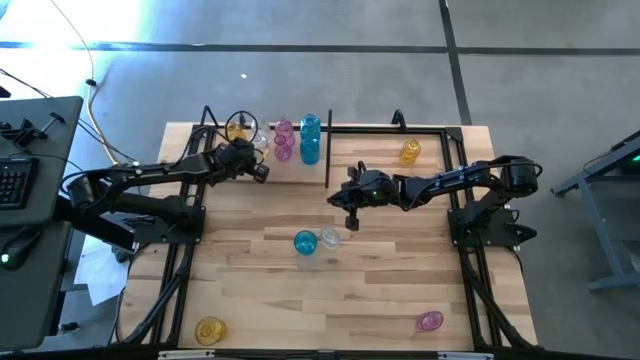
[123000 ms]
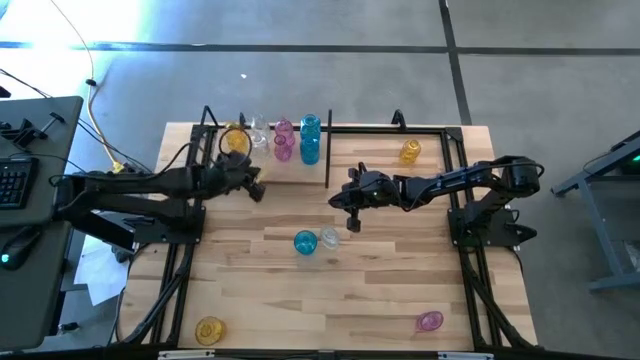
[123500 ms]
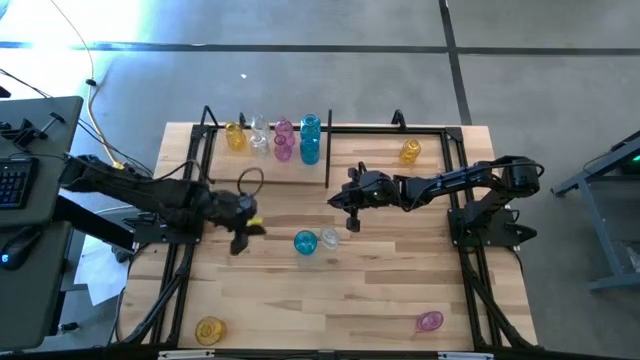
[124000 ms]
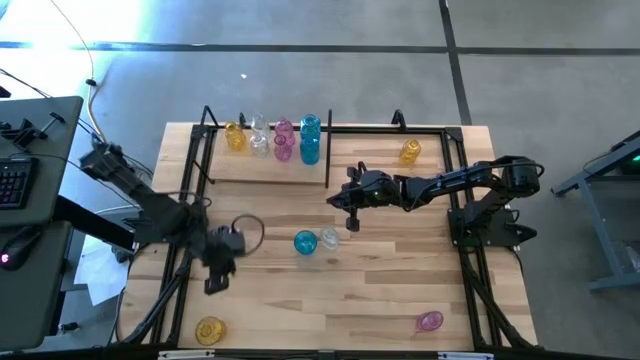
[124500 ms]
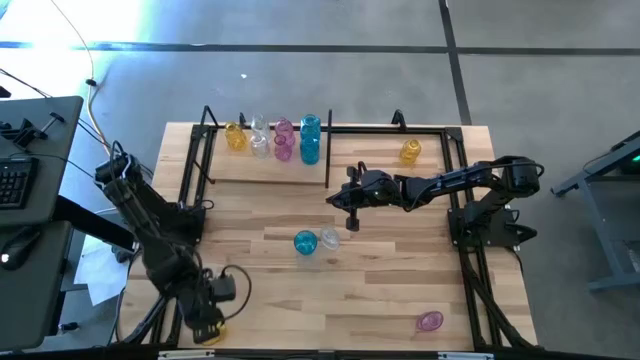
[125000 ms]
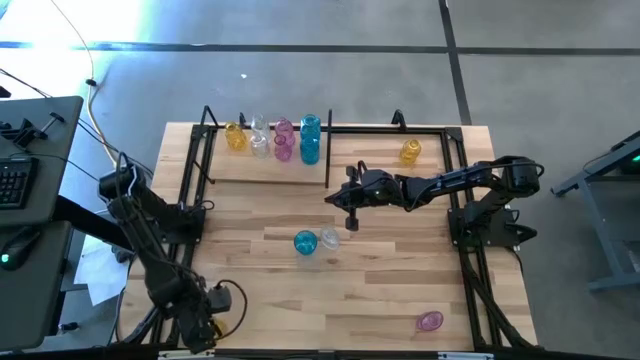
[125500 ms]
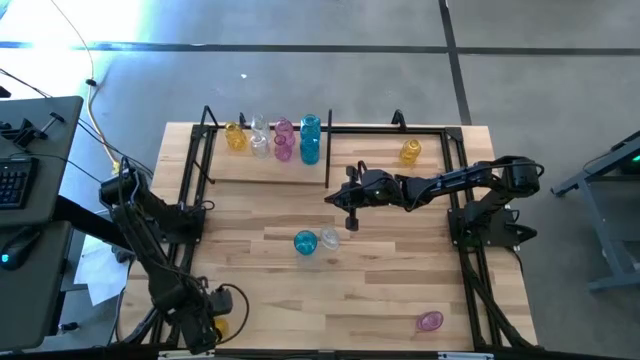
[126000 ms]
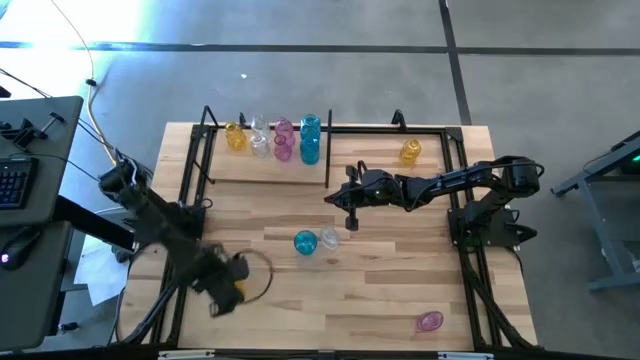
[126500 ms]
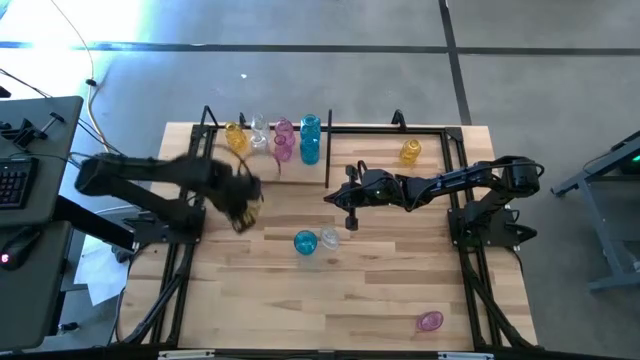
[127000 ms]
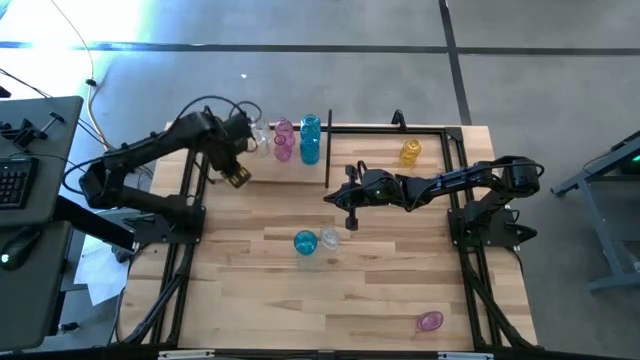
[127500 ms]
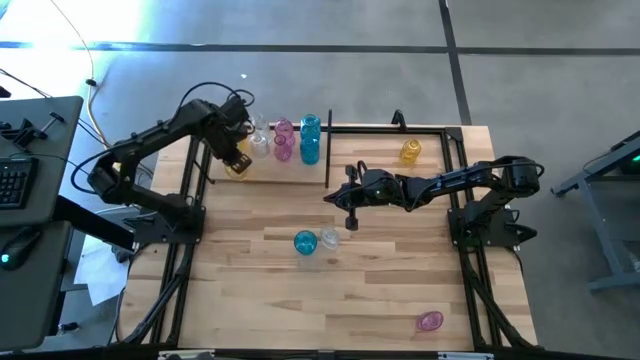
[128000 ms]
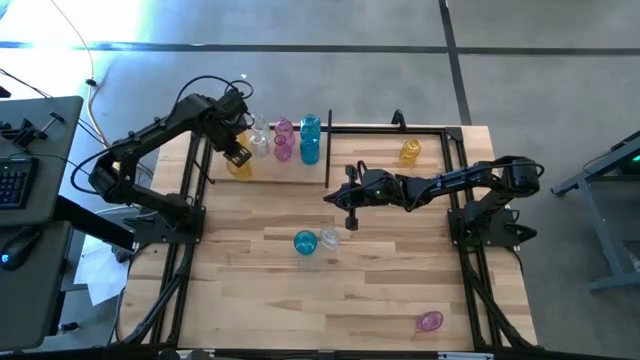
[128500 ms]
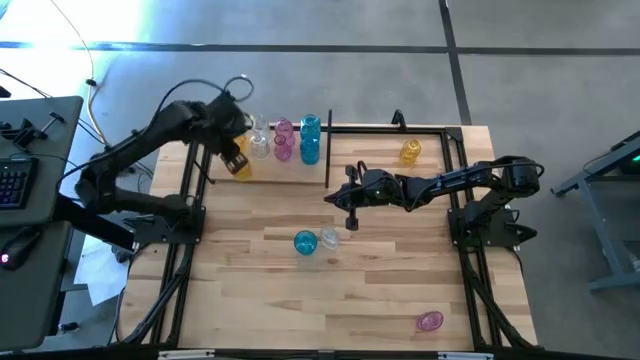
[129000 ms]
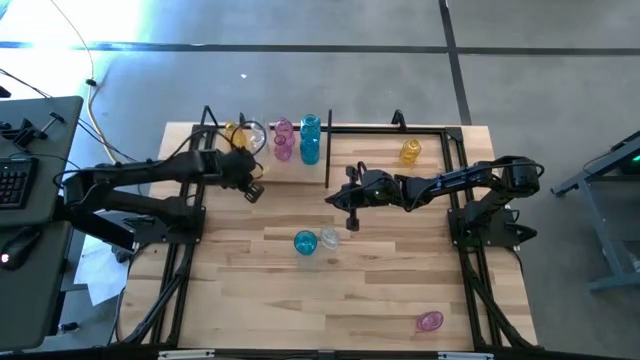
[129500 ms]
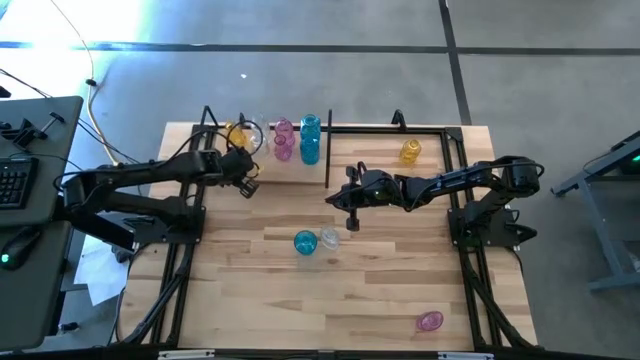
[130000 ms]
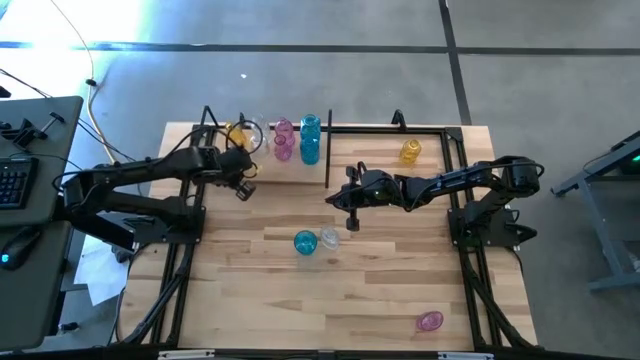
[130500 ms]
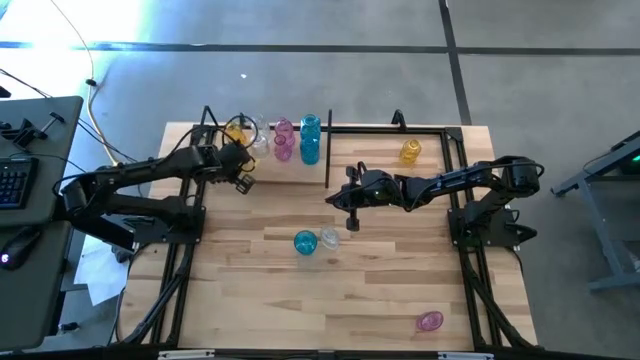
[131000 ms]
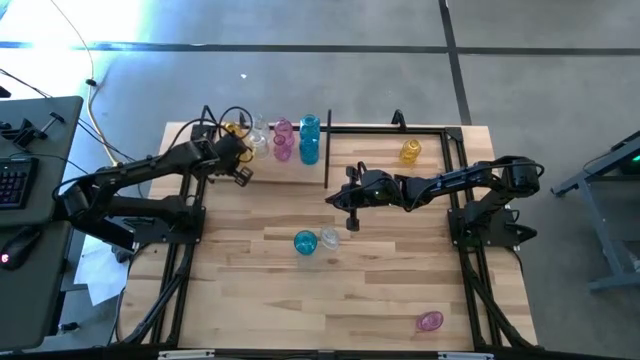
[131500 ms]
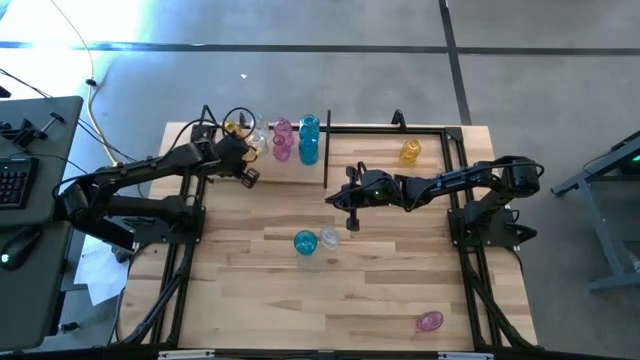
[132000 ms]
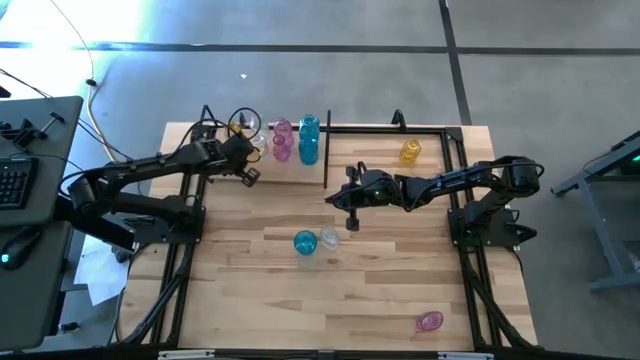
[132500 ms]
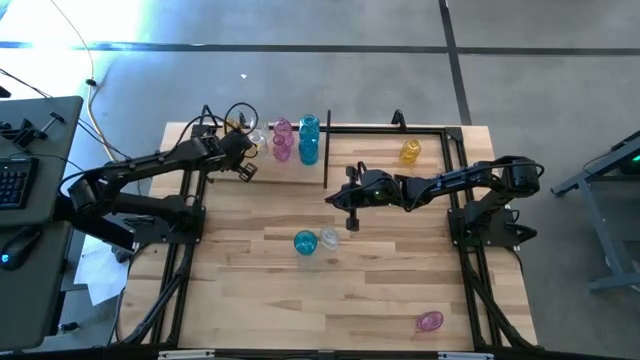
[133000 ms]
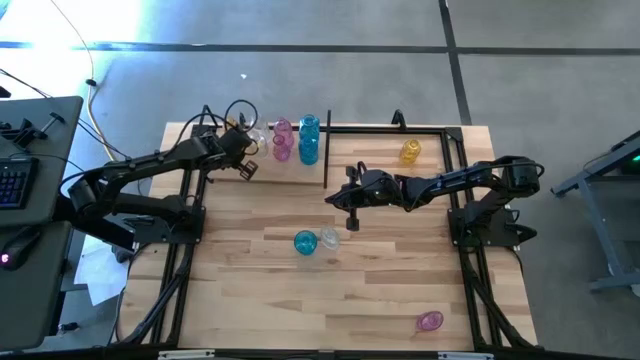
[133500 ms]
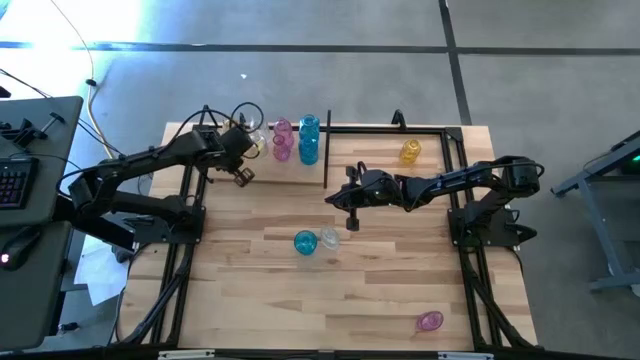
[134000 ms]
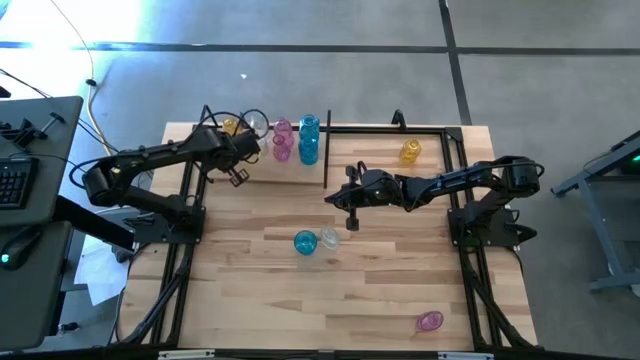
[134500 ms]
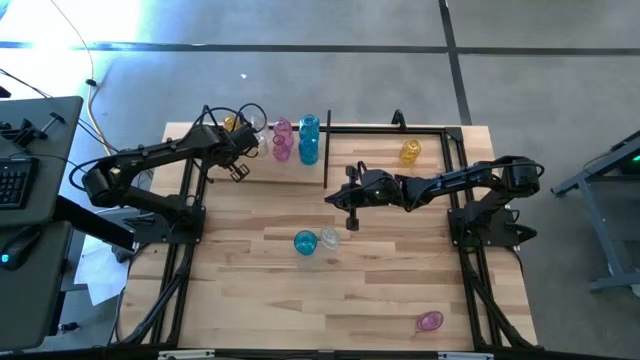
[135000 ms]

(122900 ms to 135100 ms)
Task: sort vases onto shelf
Put the bottom yellow flower vase aligned with the other yellow flower vase on the shelf

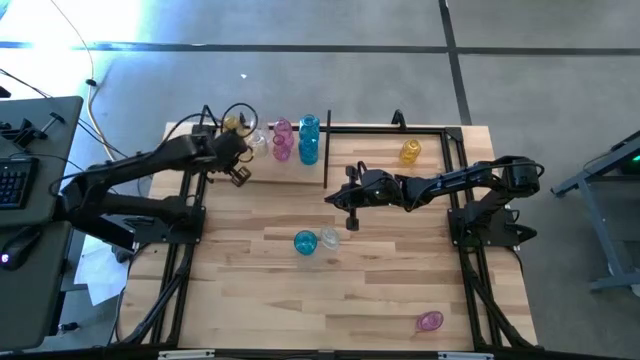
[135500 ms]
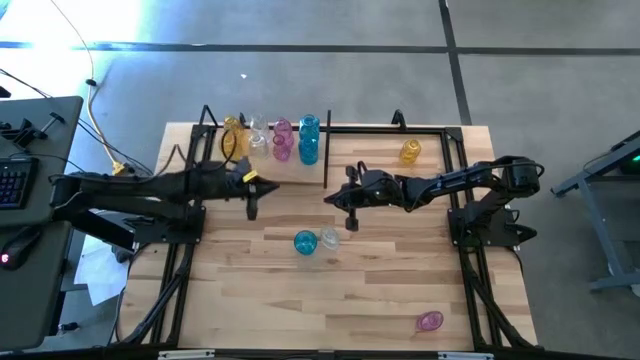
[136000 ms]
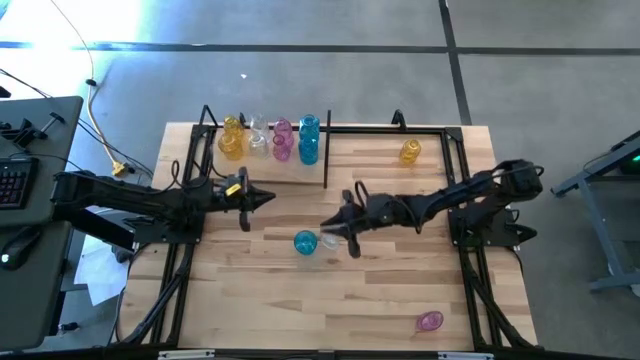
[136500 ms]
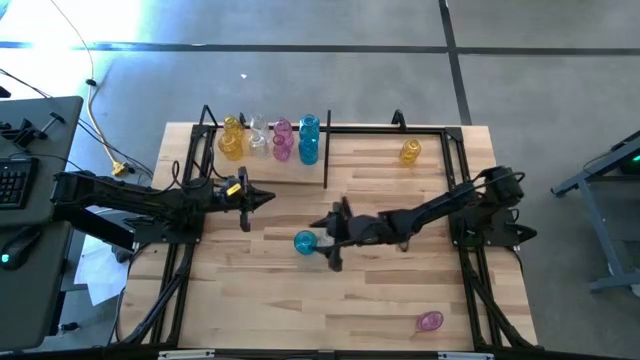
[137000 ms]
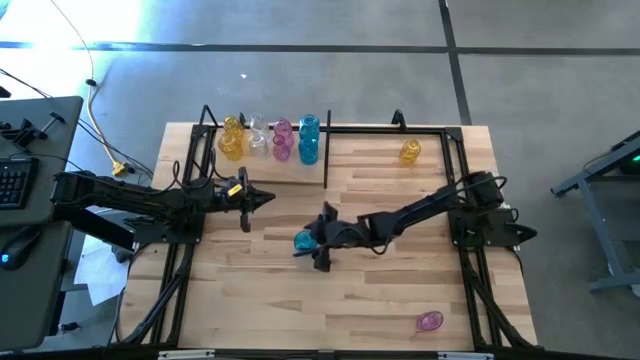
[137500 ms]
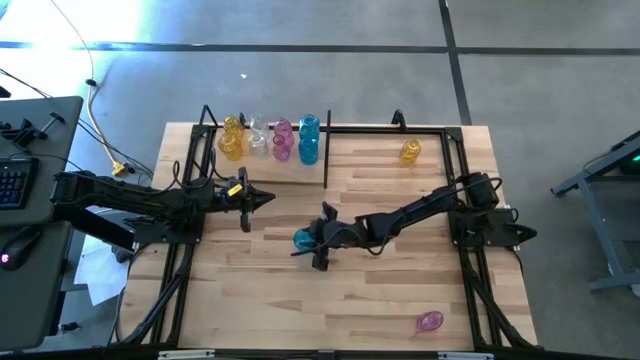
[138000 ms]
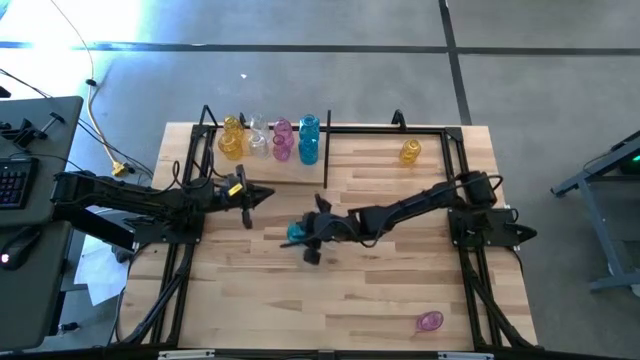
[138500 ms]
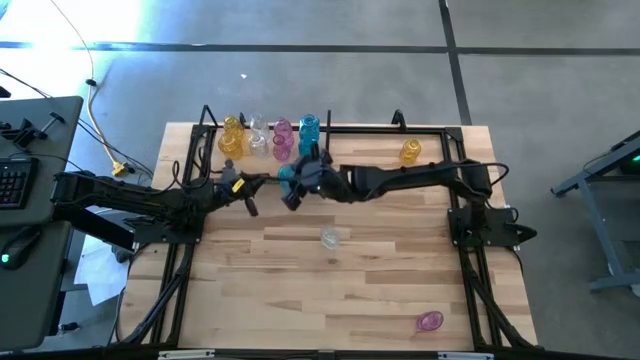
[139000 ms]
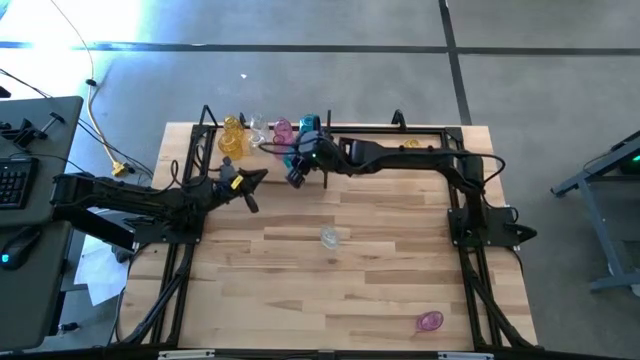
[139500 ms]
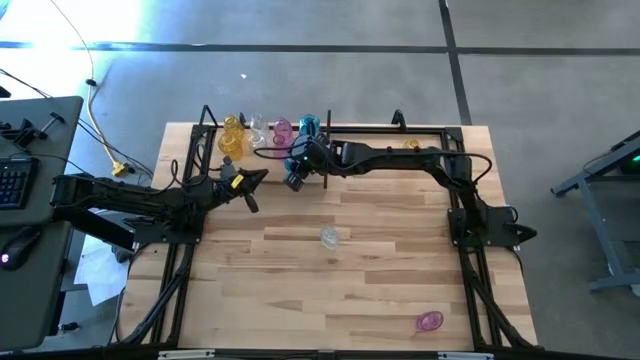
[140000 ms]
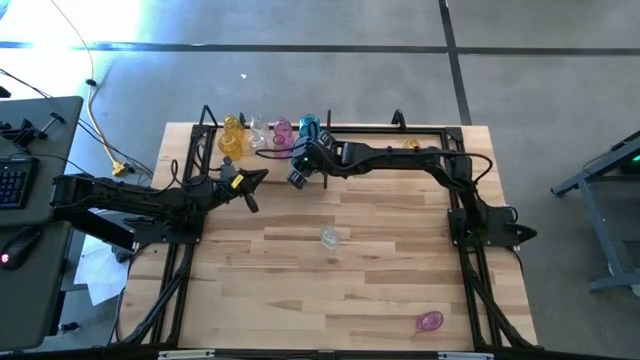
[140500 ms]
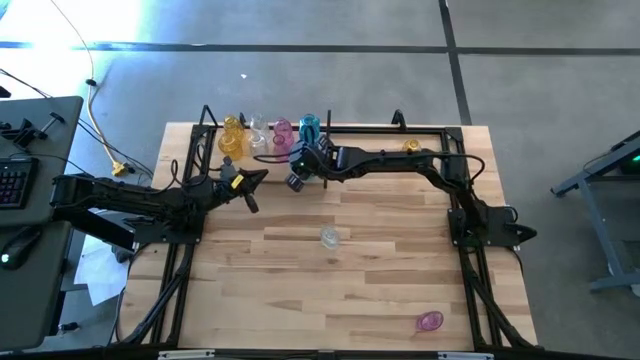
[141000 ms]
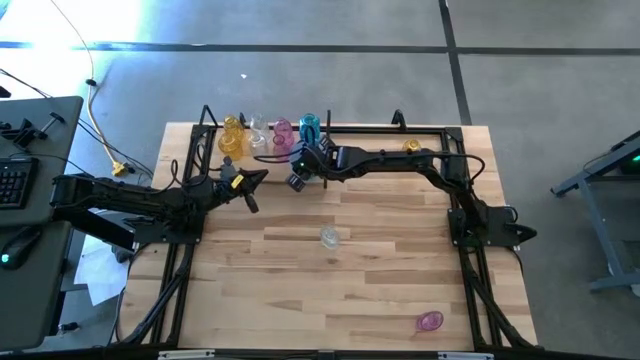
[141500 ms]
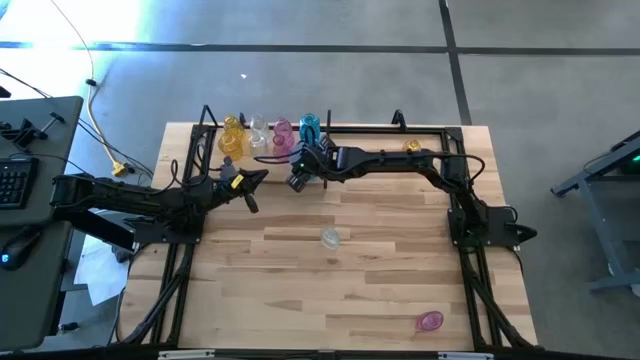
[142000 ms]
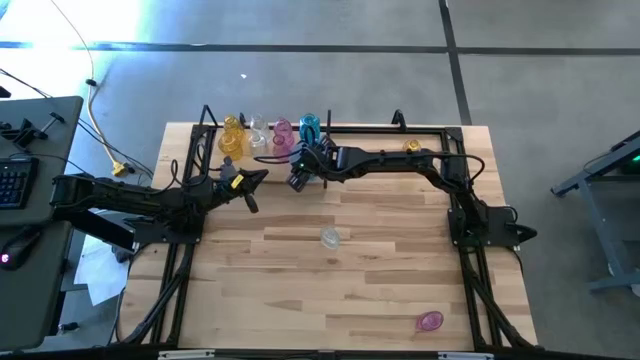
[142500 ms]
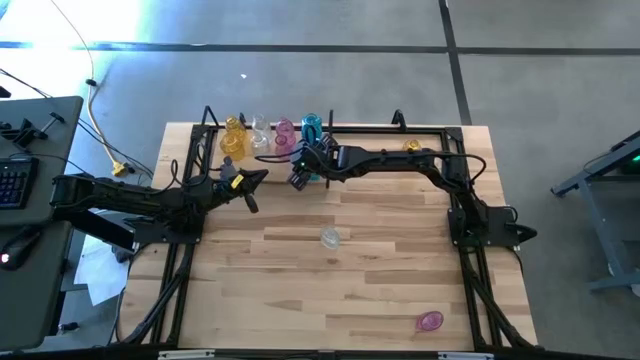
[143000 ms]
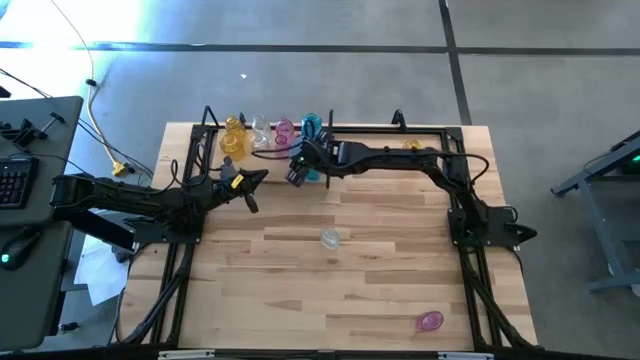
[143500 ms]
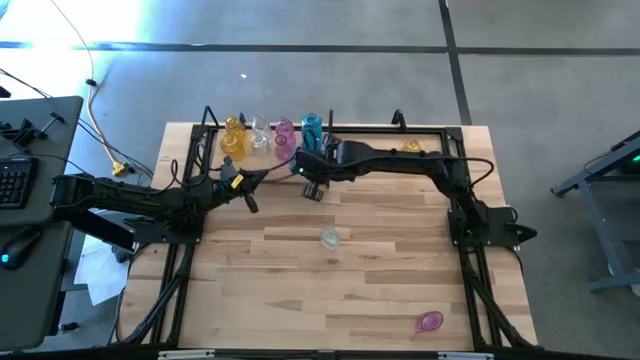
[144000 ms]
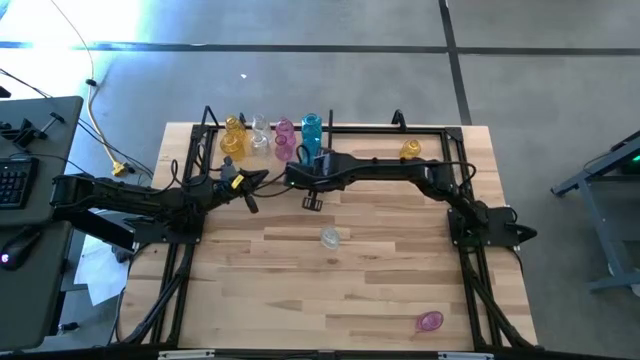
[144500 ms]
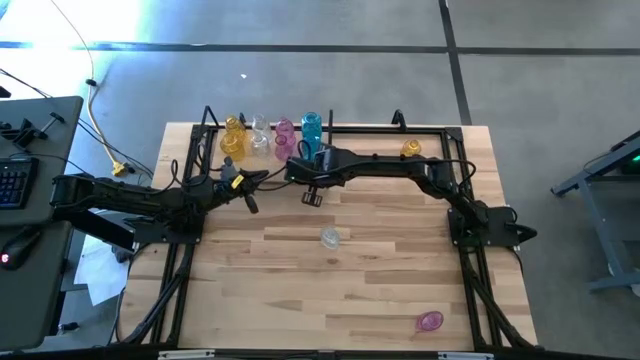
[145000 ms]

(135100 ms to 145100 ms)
Put the blue flower vase aligned with the other blue flower vase on the shelf
